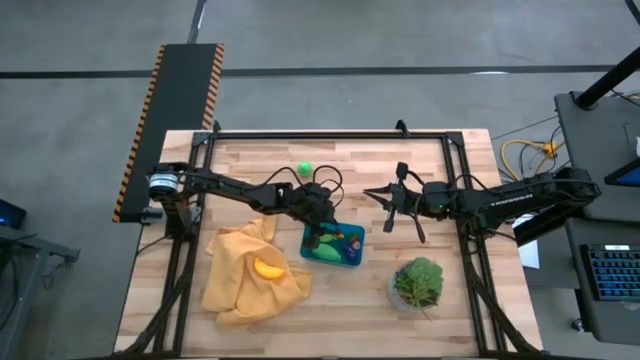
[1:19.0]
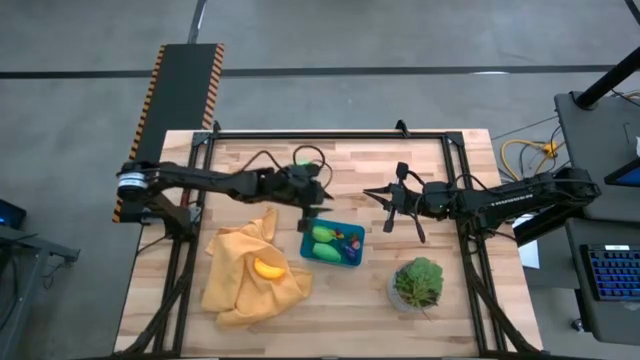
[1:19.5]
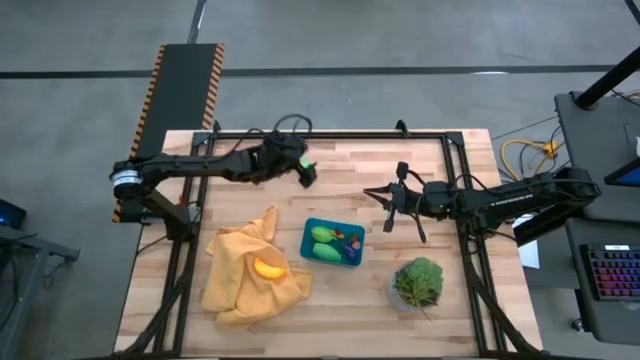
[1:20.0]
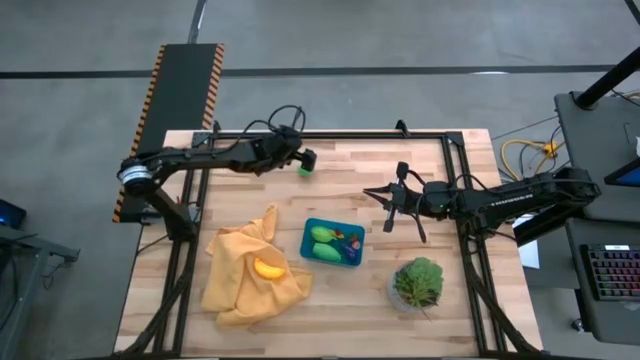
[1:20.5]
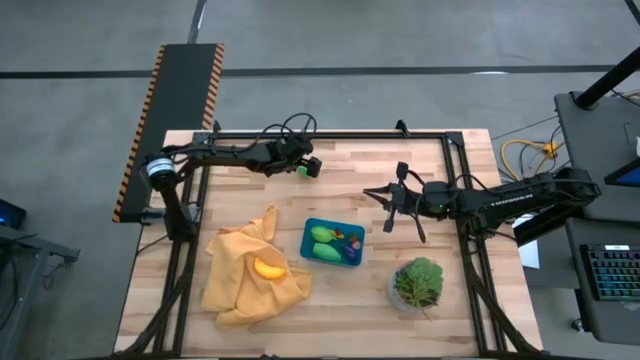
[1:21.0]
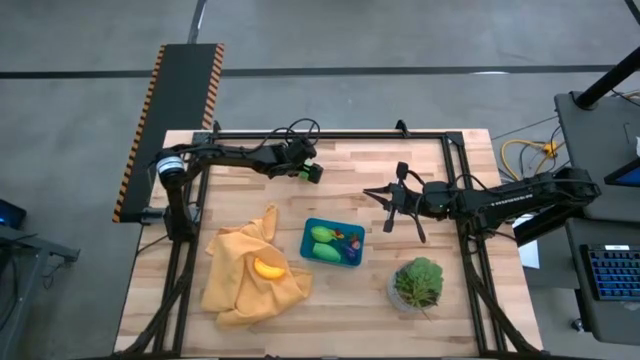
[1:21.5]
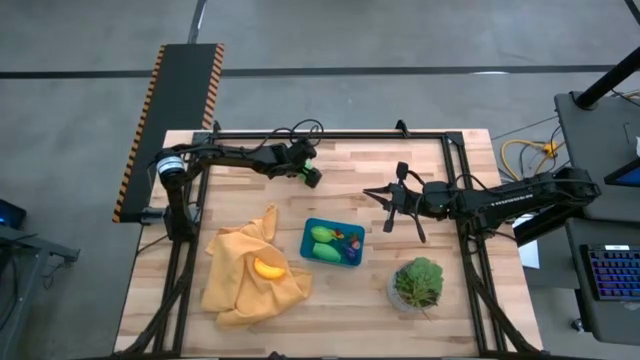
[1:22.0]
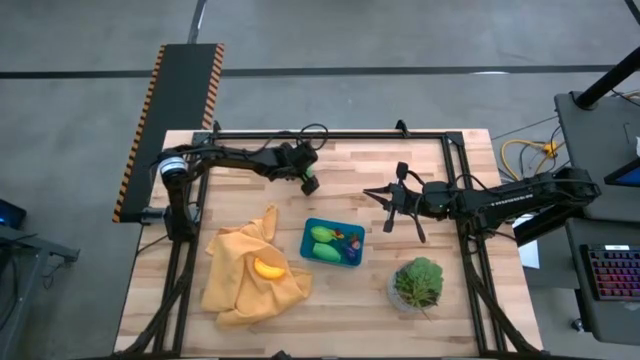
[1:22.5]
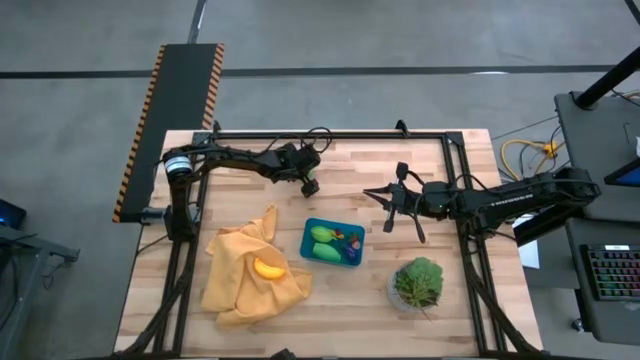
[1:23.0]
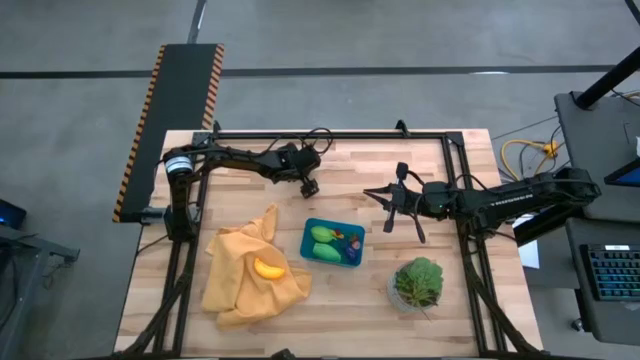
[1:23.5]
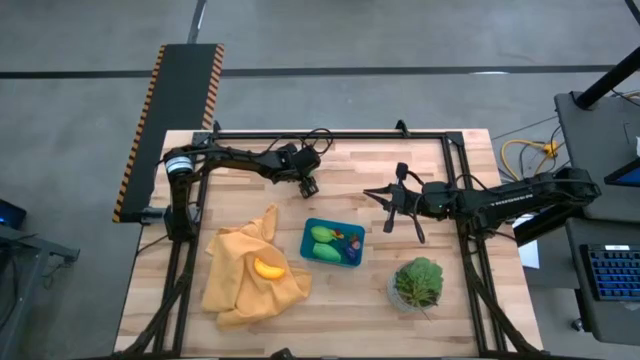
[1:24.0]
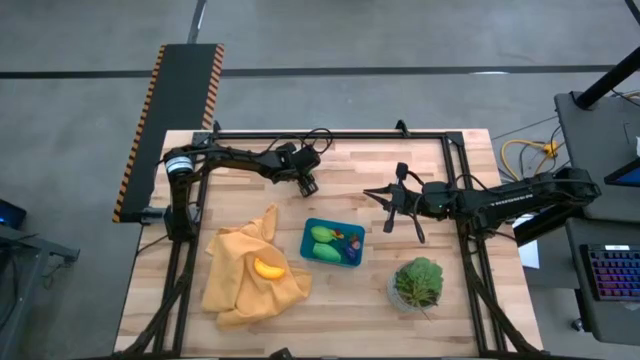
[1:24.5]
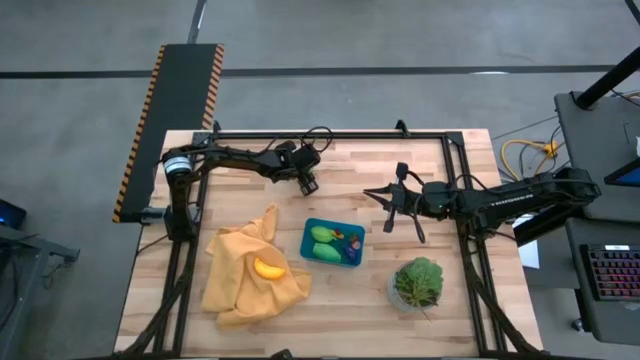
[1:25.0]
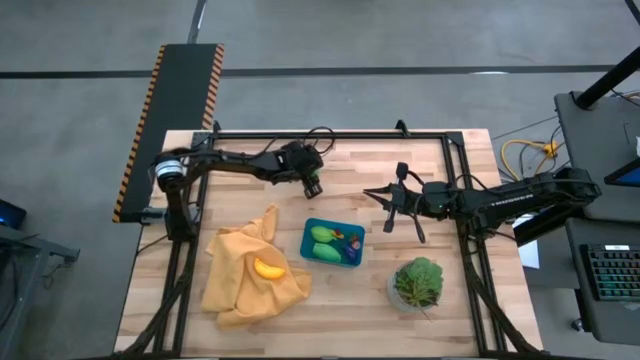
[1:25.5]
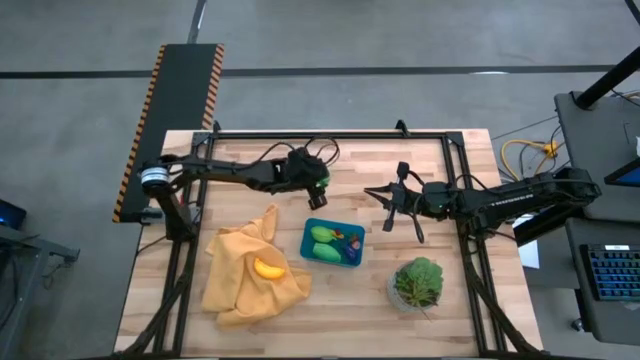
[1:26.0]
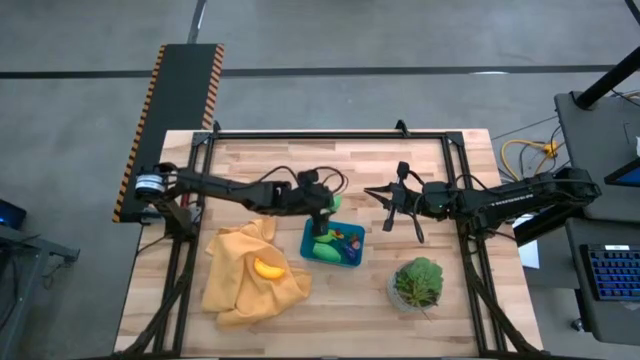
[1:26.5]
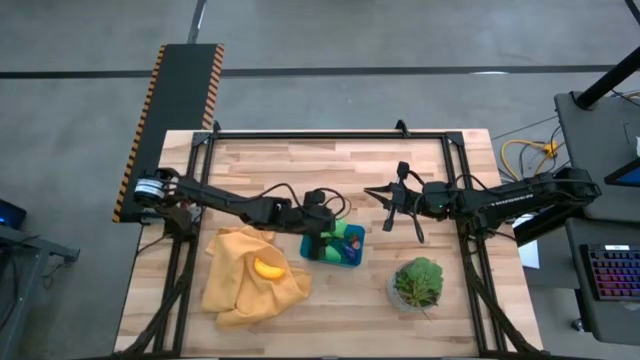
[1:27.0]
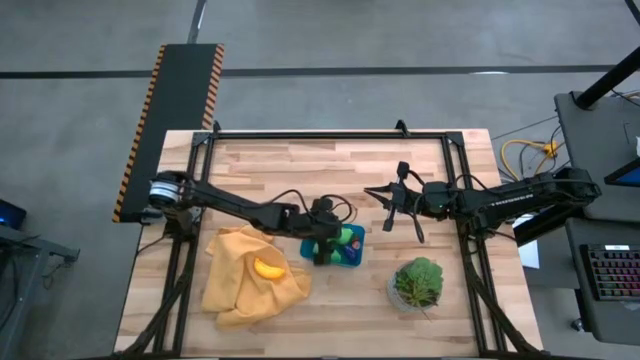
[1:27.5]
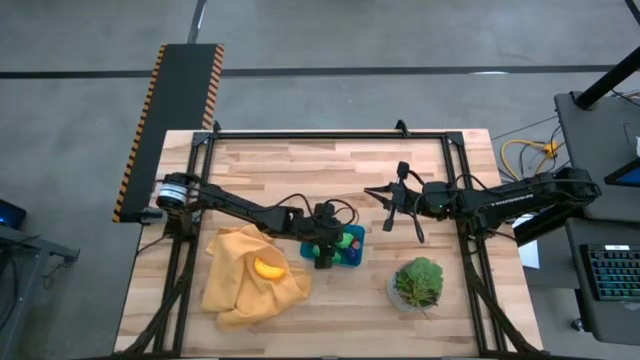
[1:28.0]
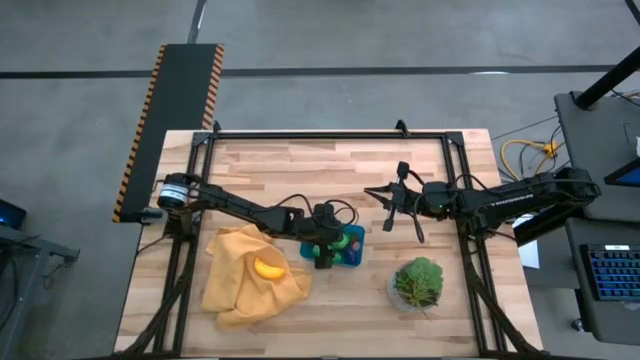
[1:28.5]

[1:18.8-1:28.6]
Task: Pick and placing Produce into tupperware
Put the pear into the blue bin

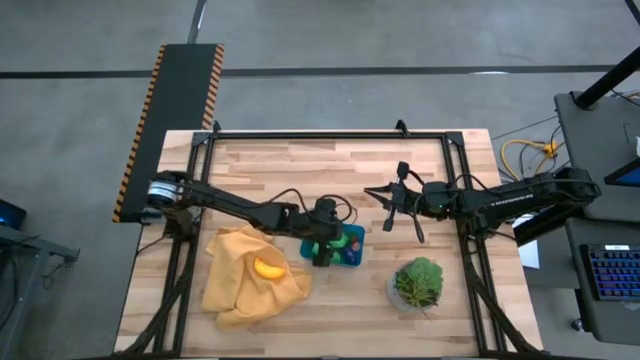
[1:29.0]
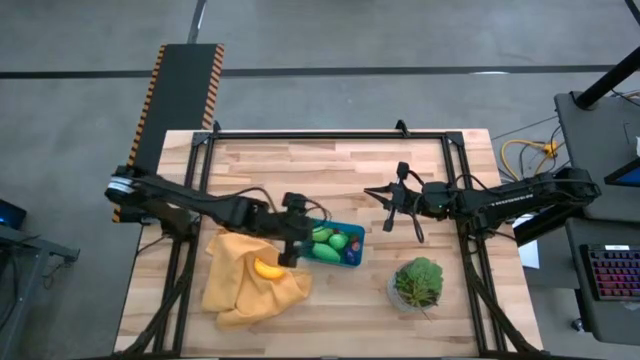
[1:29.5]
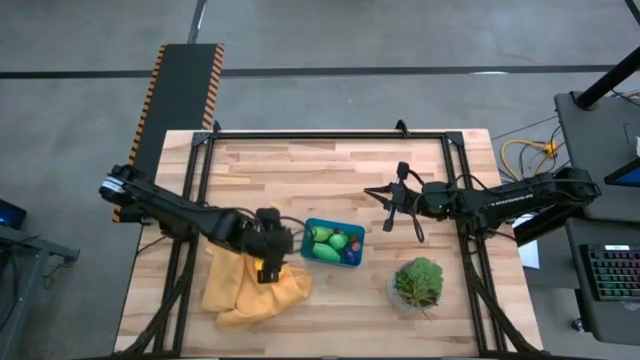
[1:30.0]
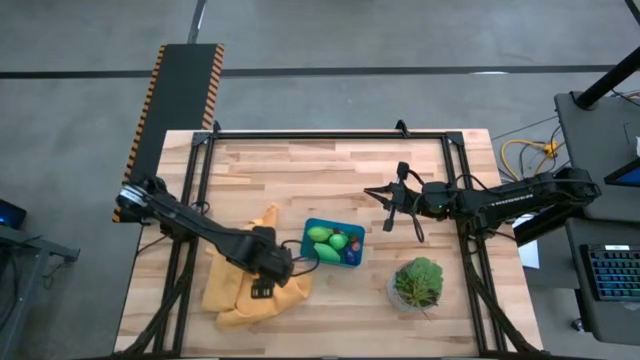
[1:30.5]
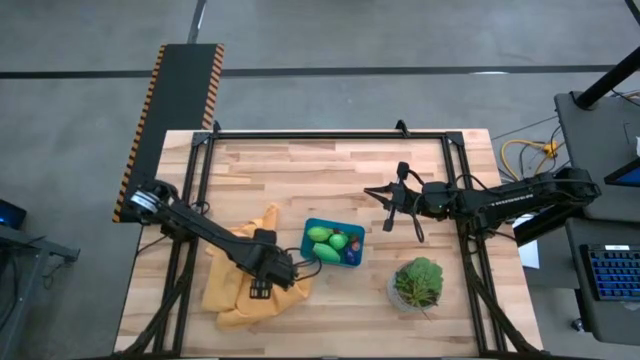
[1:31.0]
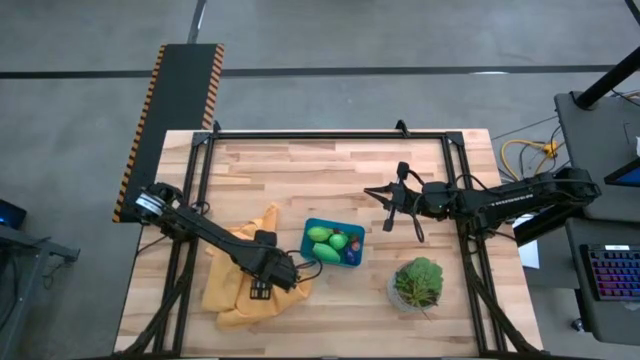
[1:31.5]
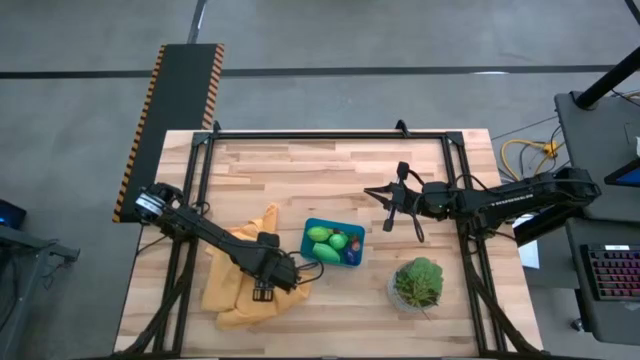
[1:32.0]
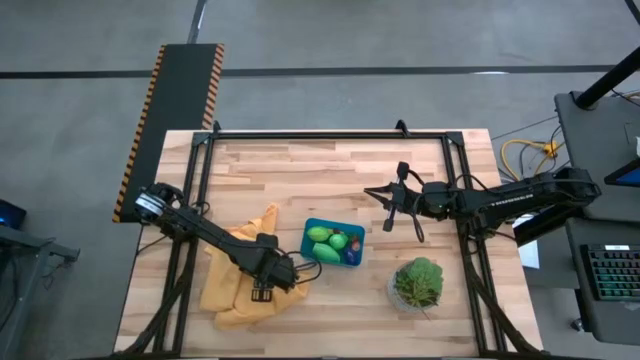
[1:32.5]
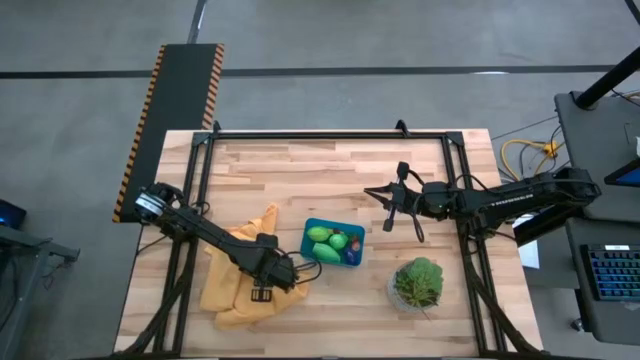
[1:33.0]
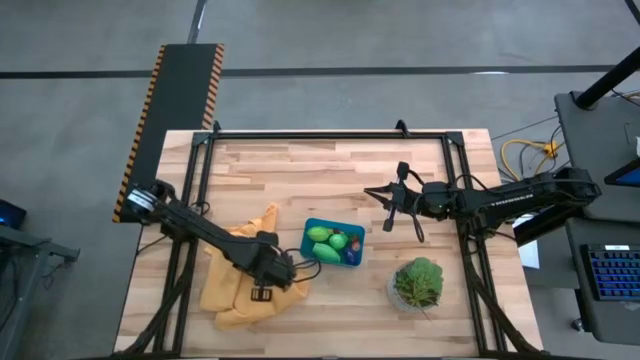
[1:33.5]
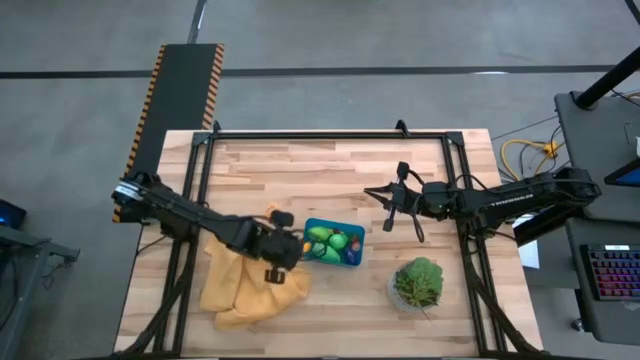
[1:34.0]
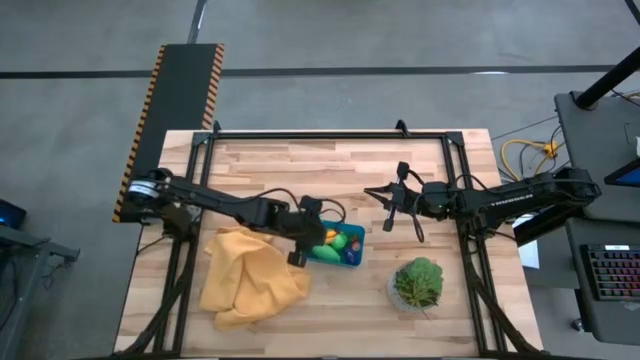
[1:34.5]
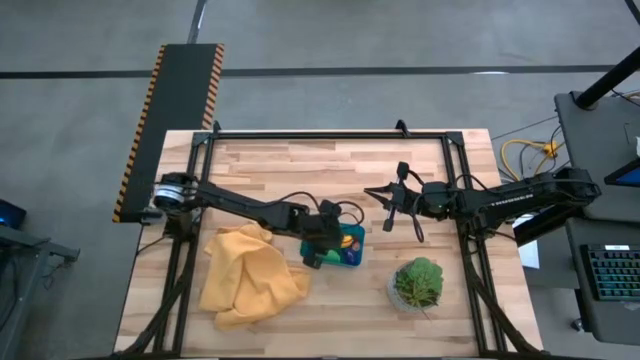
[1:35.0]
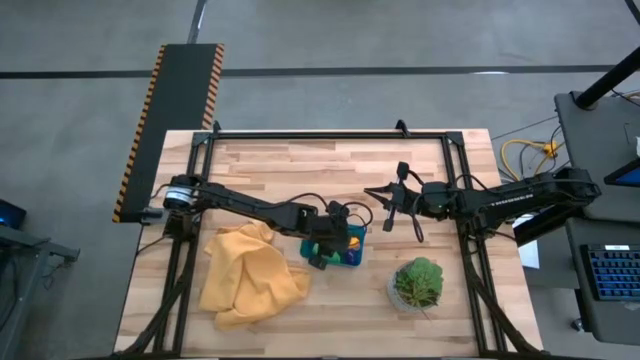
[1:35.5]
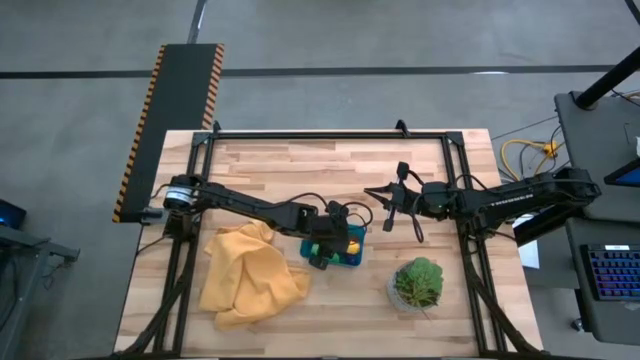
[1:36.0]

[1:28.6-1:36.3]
Put the banana into the blue bin

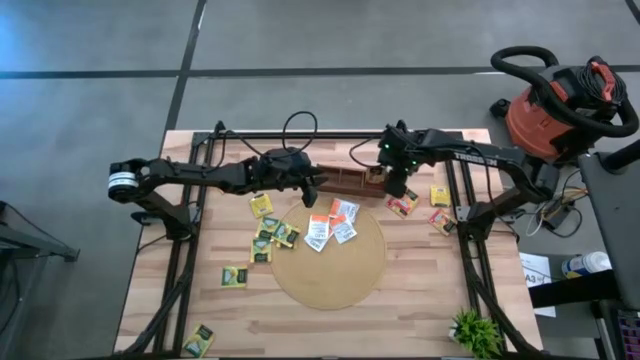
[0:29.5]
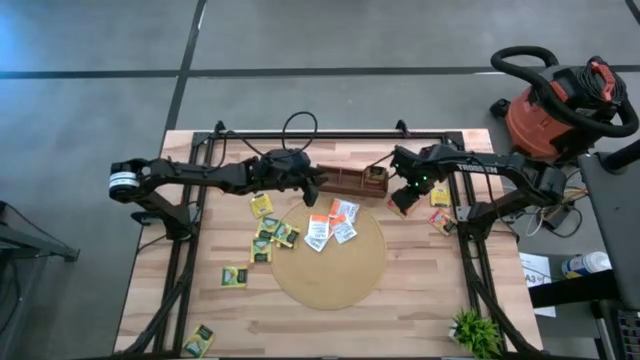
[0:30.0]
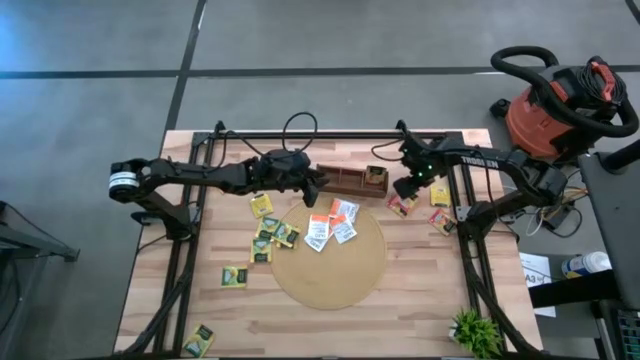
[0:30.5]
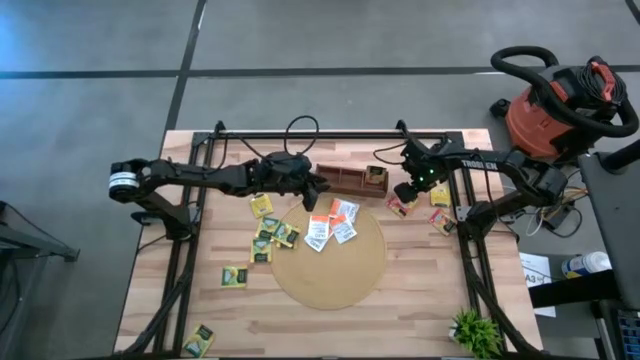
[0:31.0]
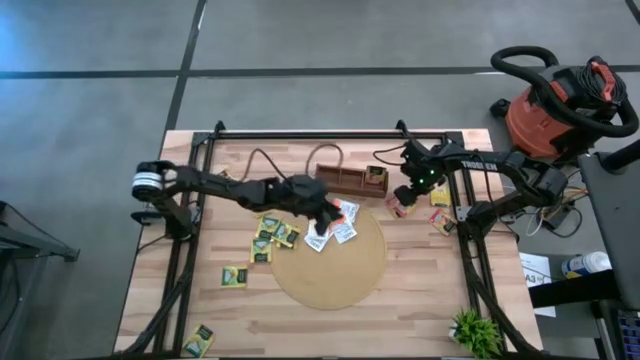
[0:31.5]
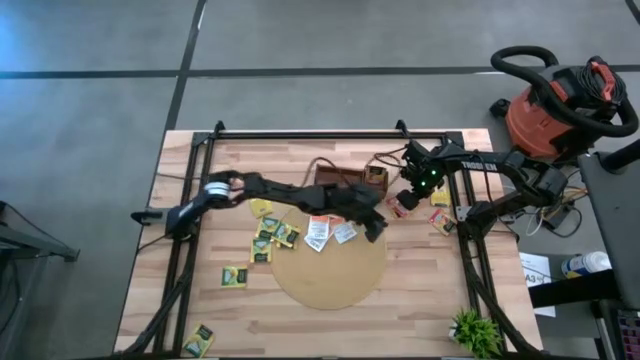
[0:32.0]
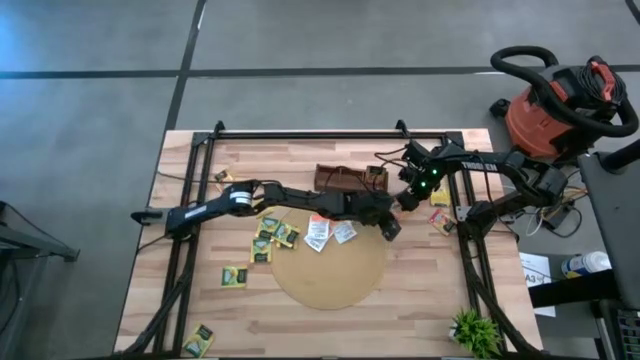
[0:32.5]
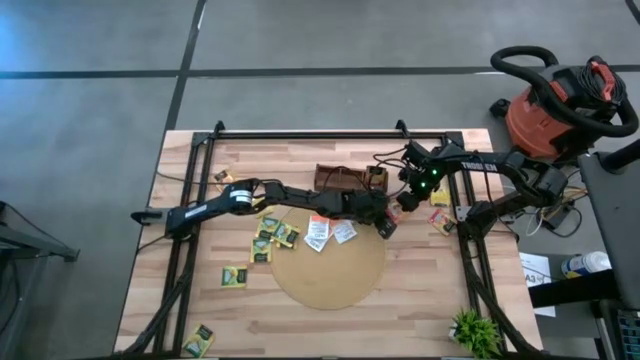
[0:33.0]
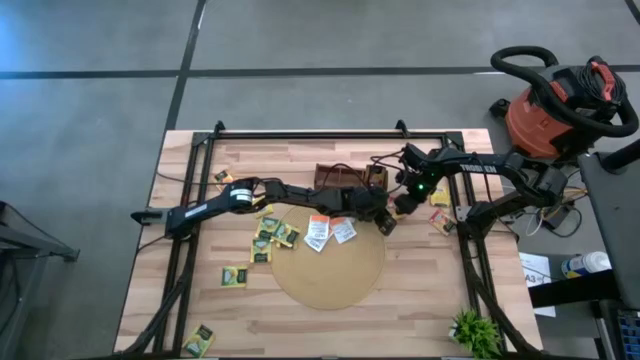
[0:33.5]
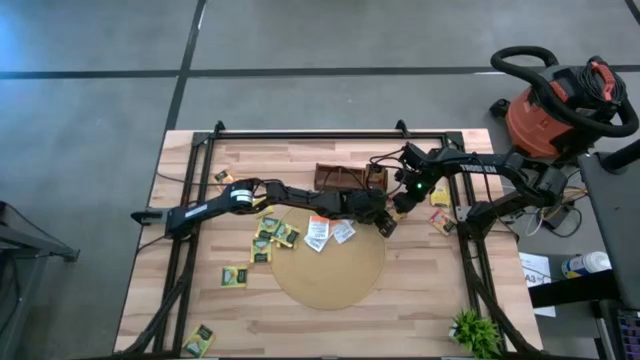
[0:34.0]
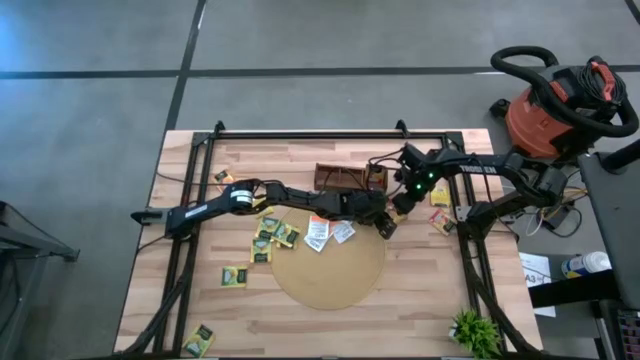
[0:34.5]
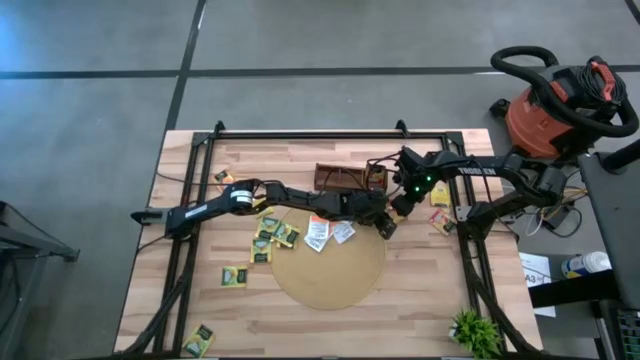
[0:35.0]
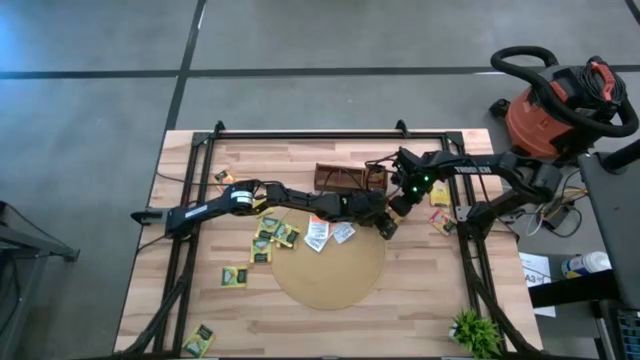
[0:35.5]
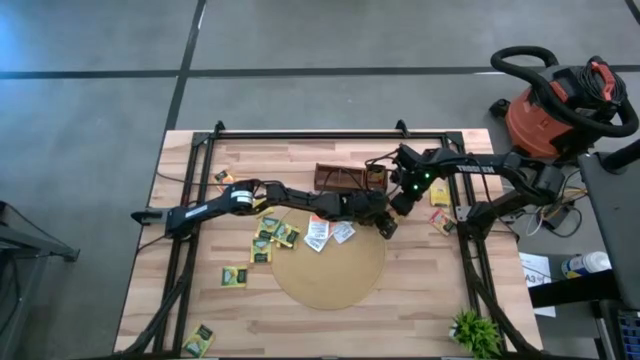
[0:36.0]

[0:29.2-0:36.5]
Task: Pick & Place Tea
Put the mango tea bag into the right section of the wooden organizer
